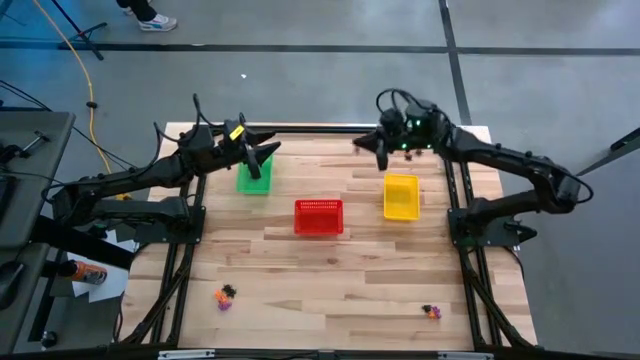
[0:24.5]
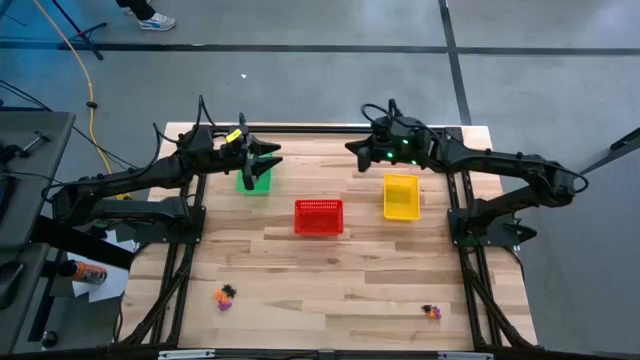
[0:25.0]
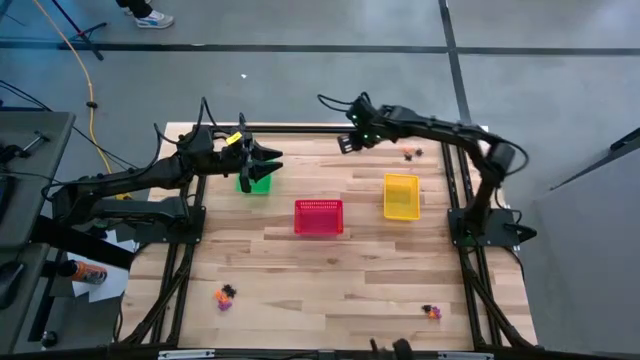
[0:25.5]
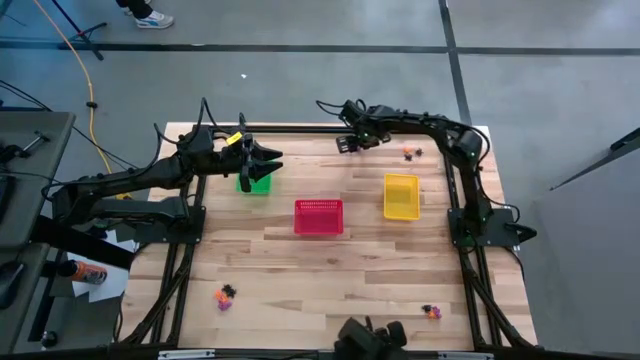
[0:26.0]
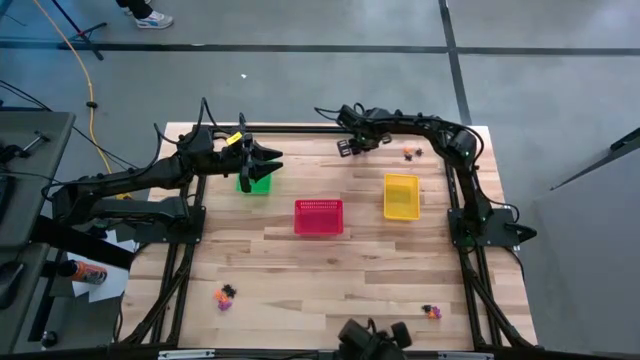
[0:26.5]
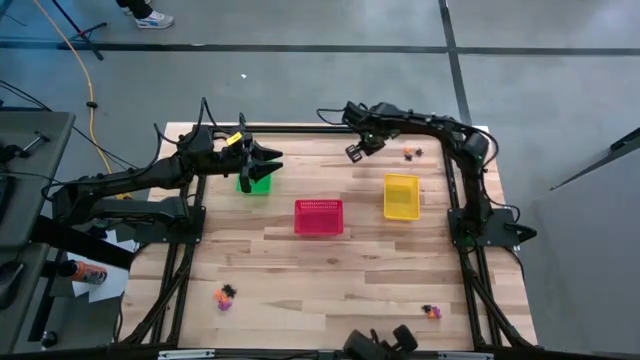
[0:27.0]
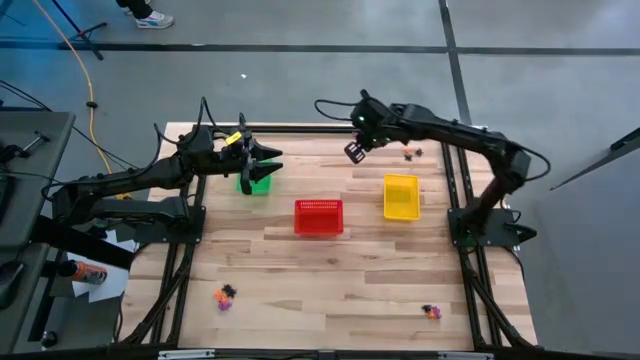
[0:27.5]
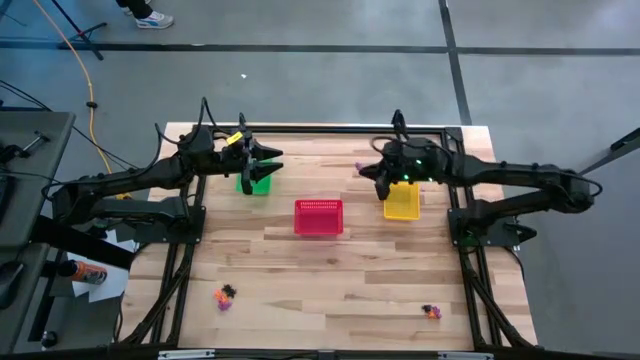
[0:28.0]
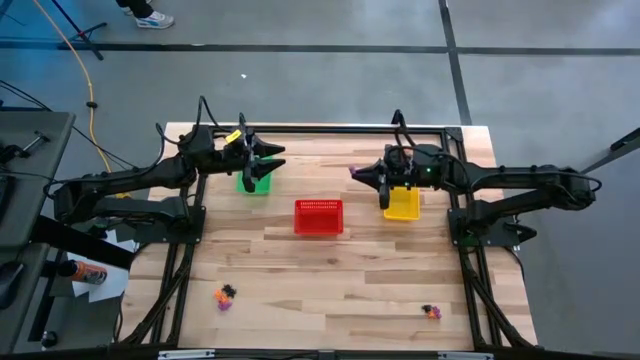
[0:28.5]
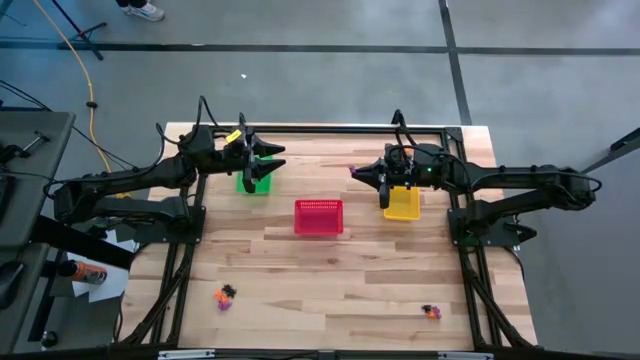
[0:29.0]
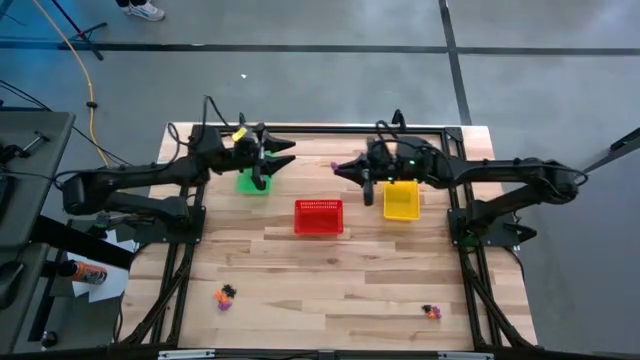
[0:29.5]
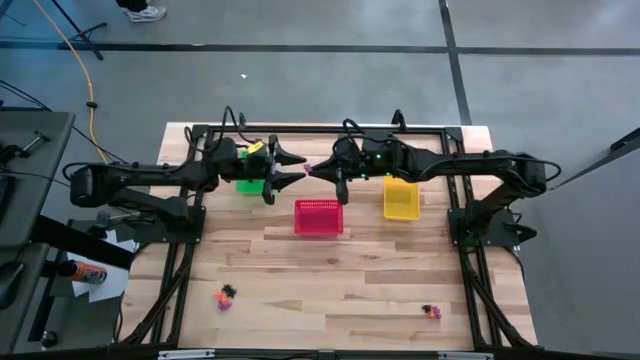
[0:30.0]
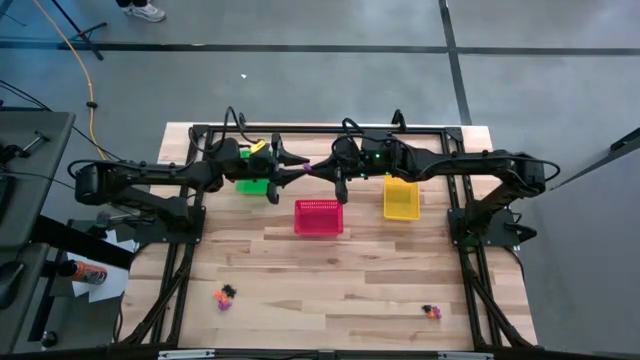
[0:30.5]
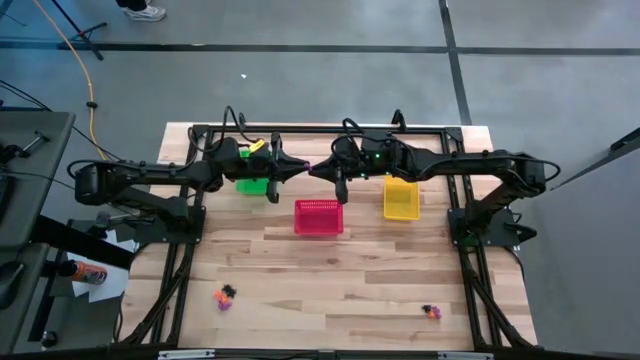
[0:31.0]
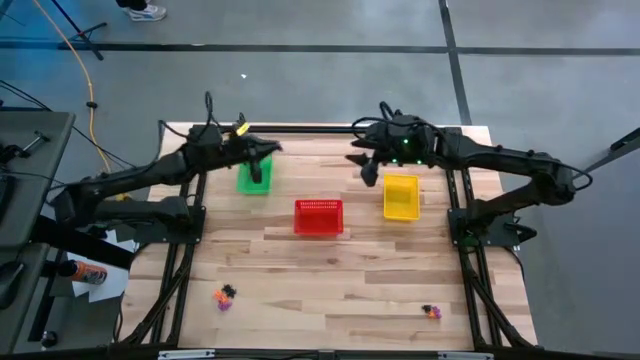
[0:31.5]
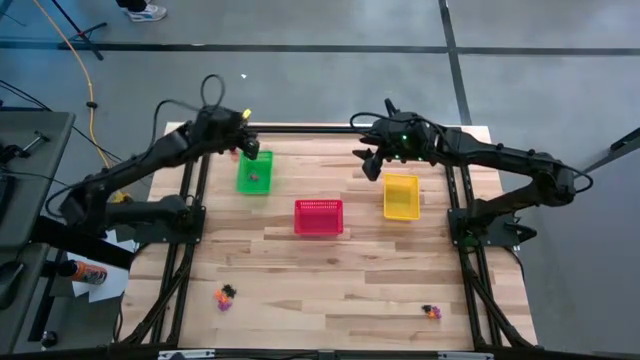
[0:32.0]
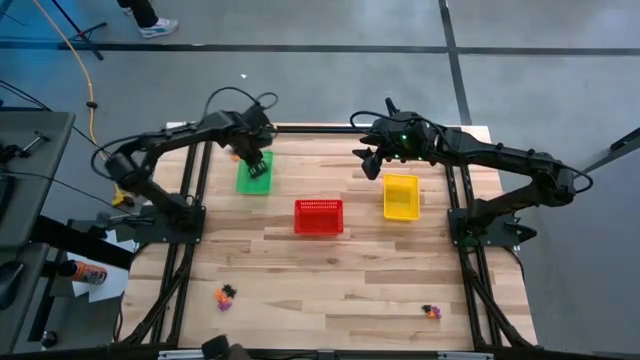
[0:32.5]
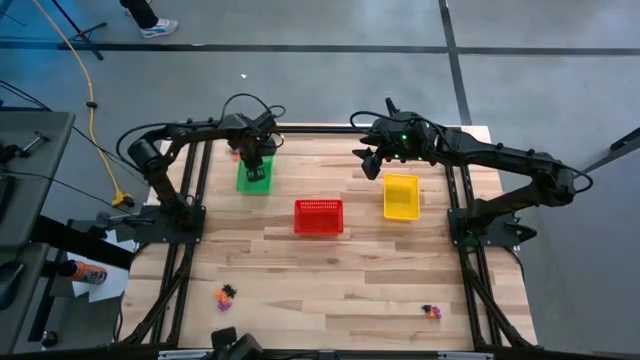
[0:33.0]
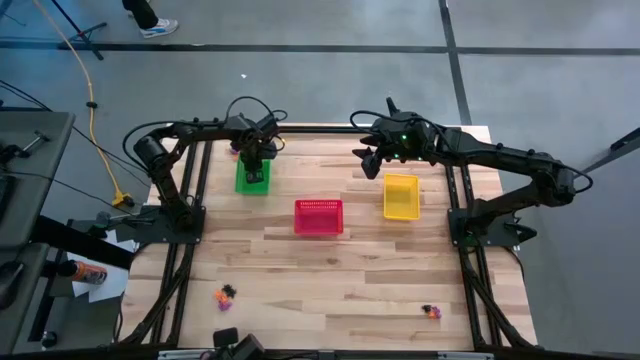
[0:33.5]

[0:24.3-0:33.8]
Task: Sort Halloween decoration
Put the purple skeleton toy into the green bin

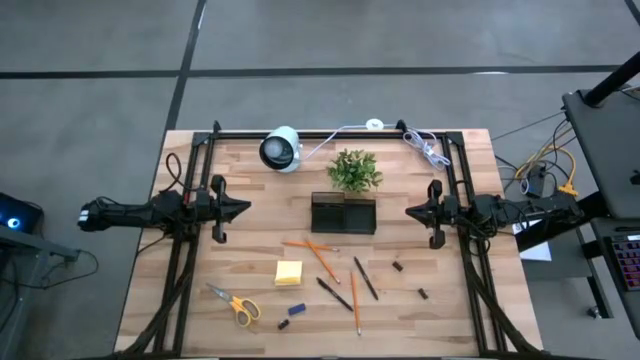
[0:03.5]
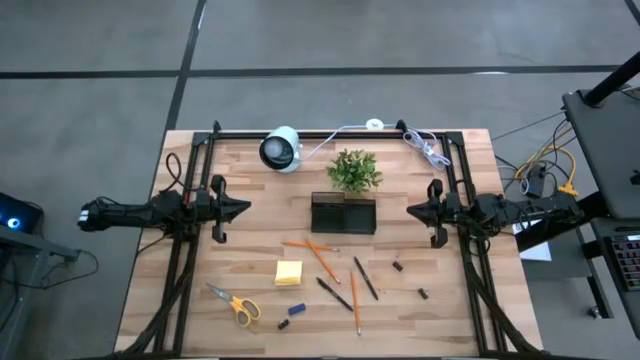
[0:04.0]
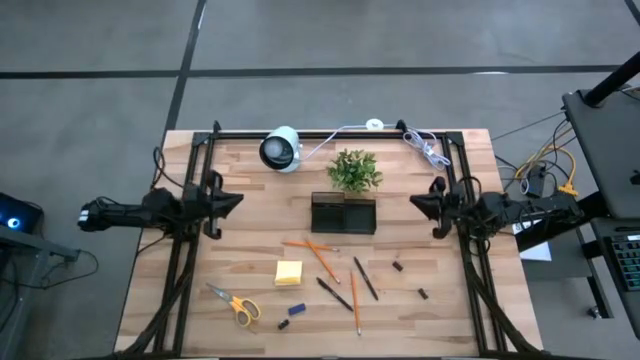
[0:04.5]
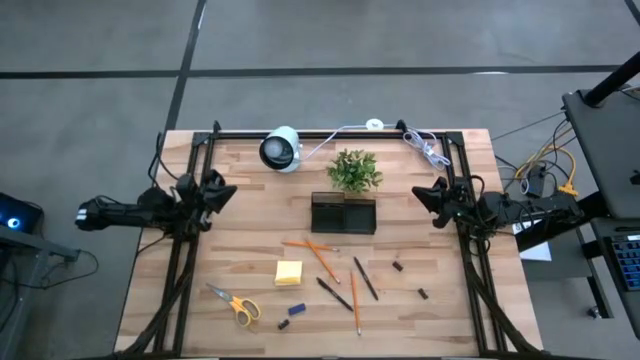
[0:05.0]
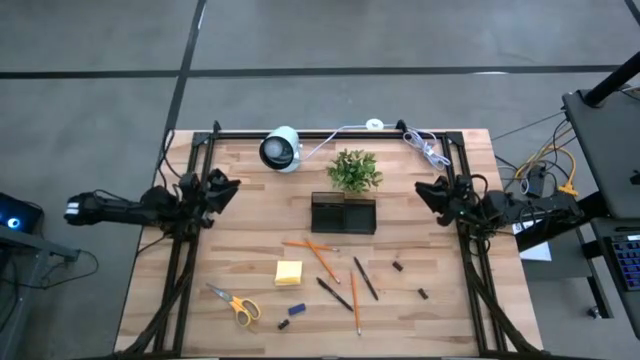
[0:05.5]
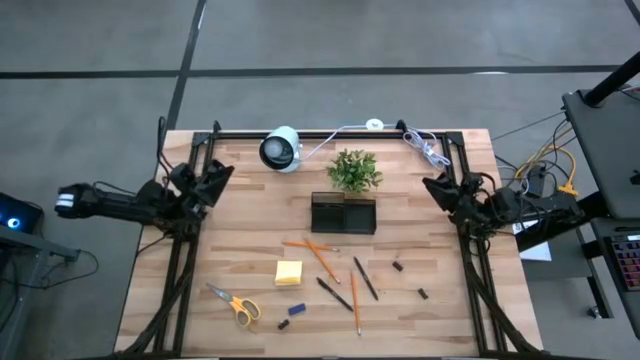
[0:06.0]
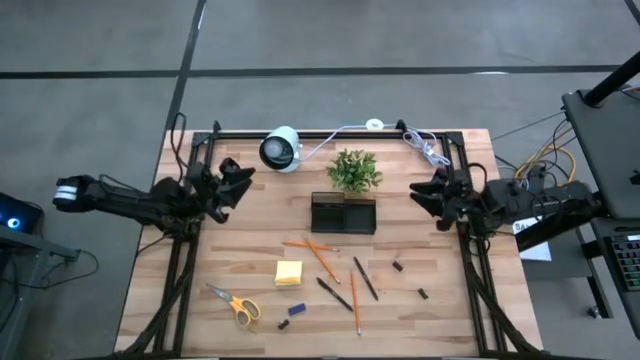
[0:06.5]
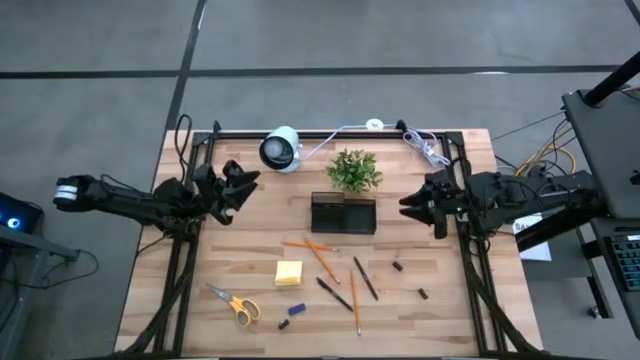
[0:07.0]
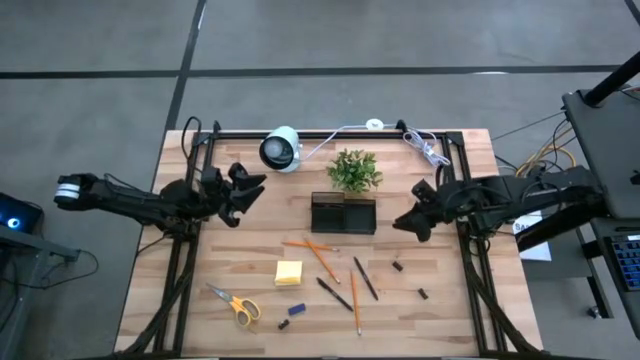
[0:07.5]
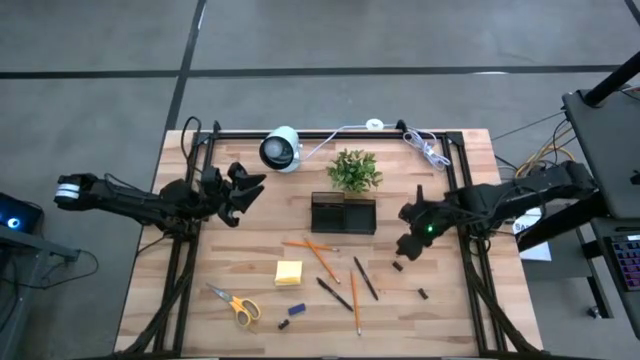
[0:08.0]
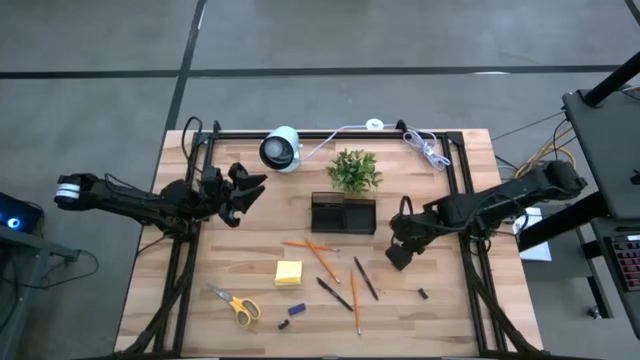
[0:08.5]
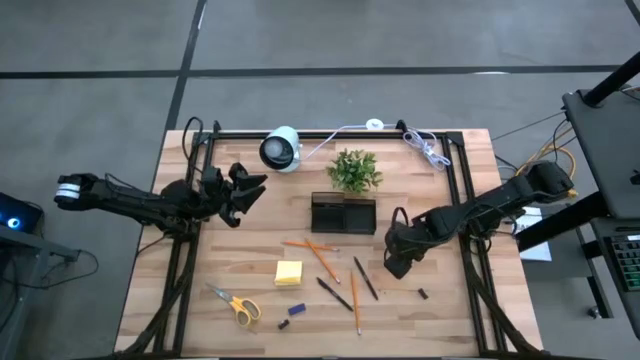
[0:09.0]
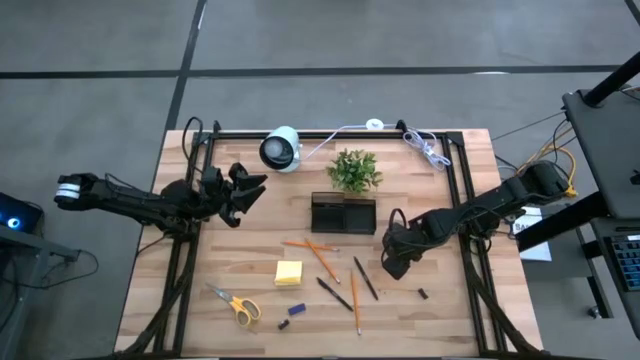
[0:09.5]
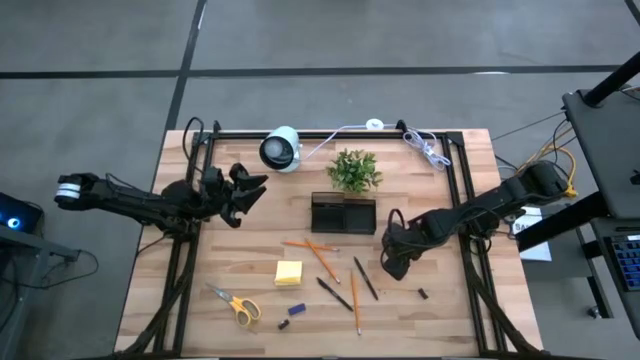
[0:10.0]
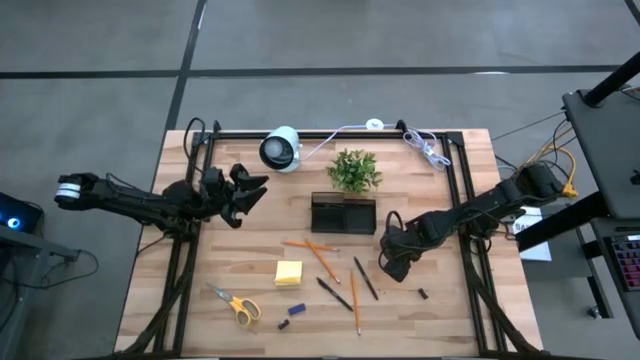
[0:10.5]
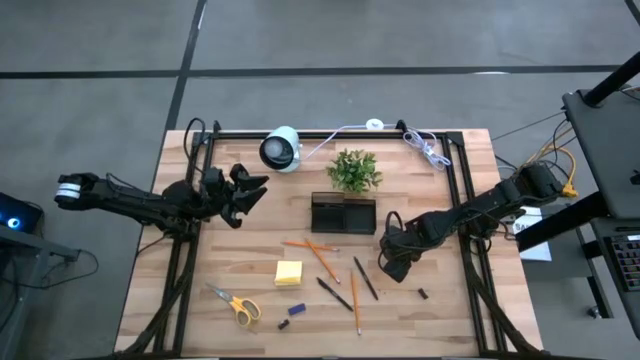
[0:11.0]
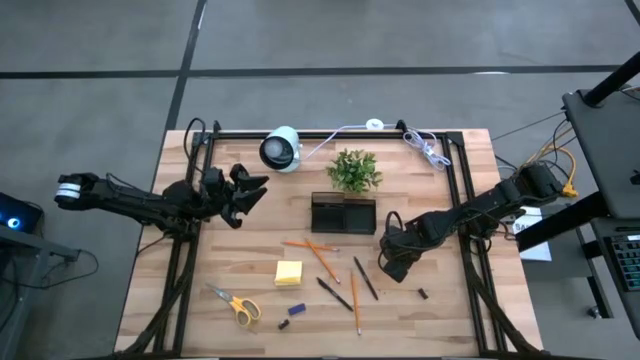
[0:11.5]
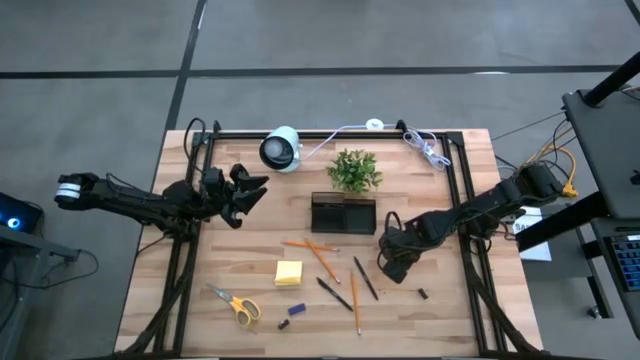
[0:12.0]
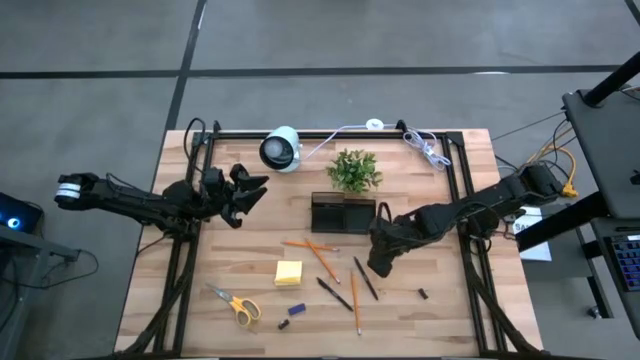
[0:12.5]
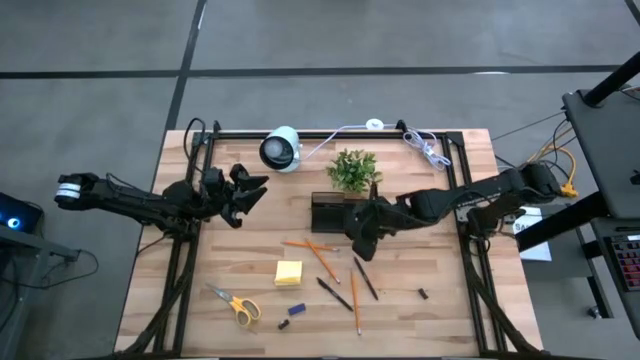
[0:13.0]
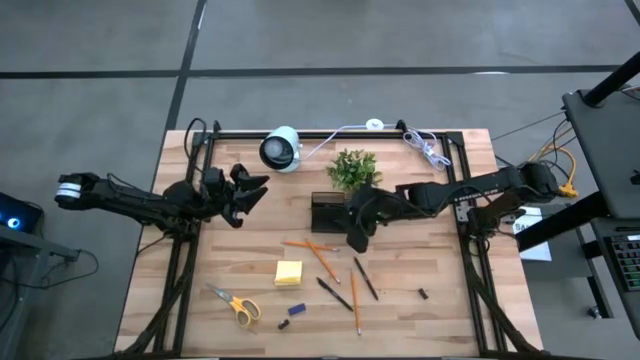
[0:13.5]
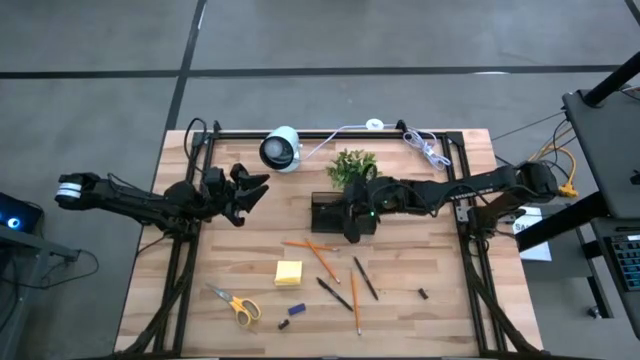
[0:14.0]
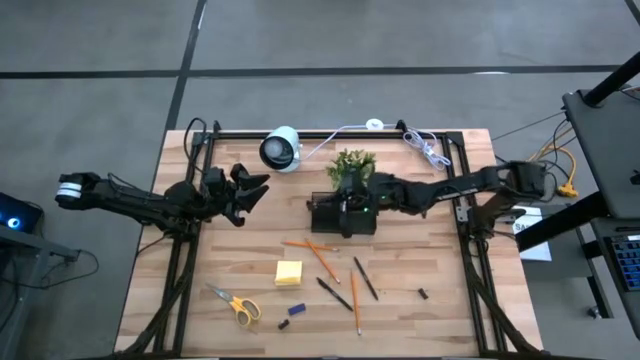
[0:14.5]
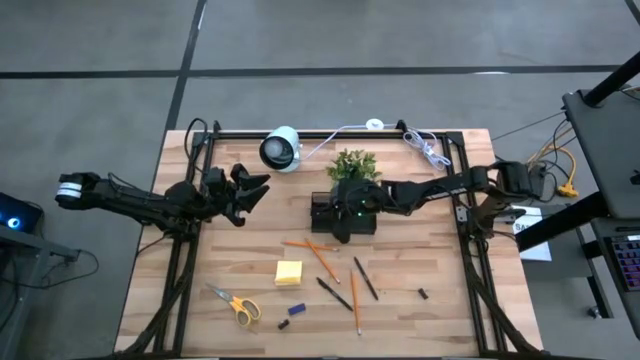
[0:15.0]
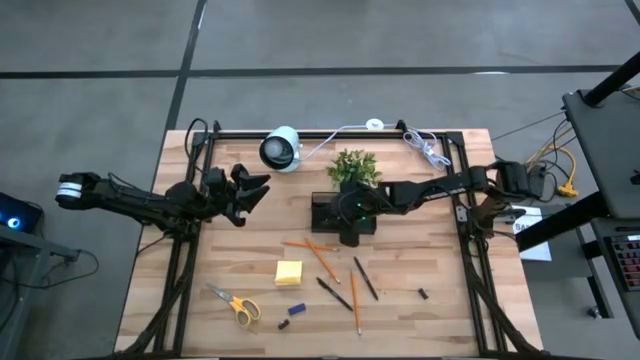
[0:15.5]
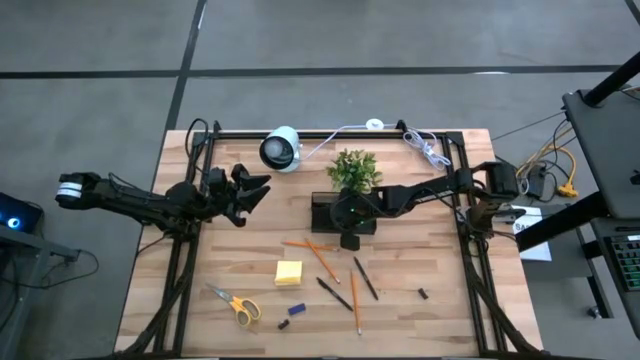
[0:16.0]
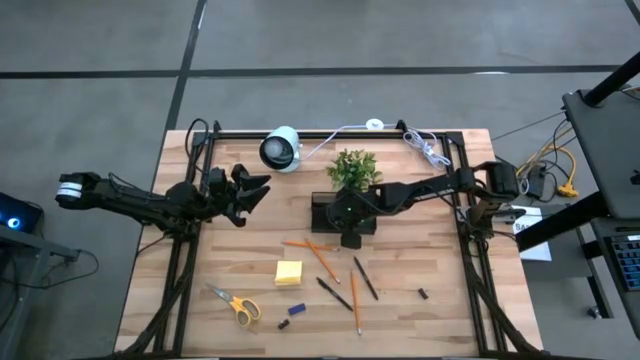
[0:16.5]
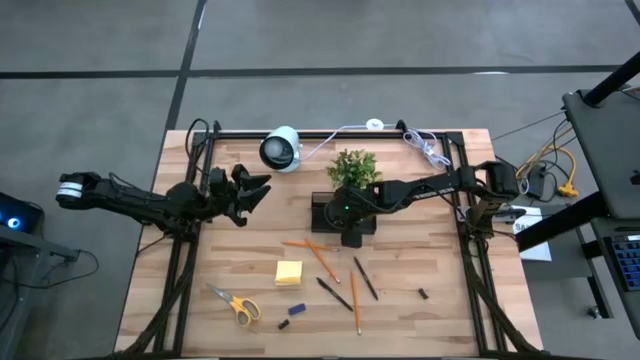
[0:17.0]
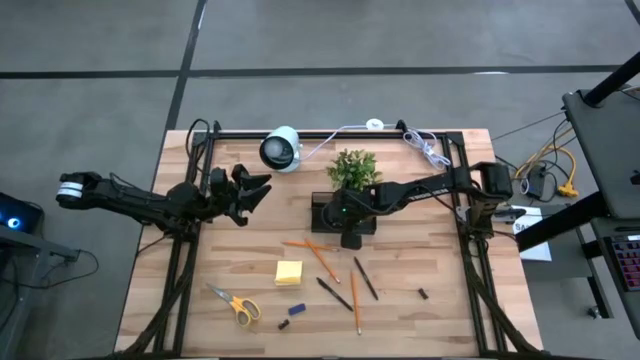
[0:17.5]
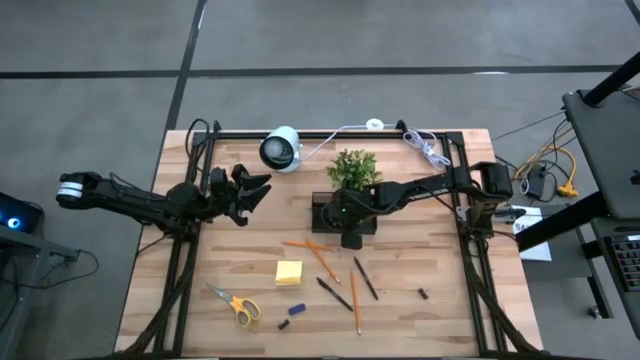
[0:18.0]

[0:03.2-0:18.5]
Task: Pick and place office supplies into organizer
Put the top right black binder clip into the black desk organizer
